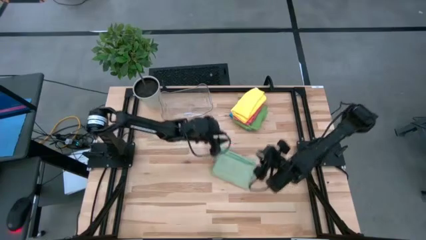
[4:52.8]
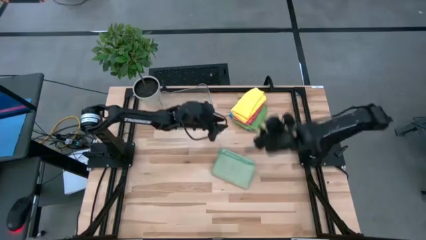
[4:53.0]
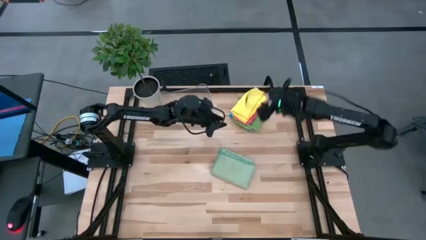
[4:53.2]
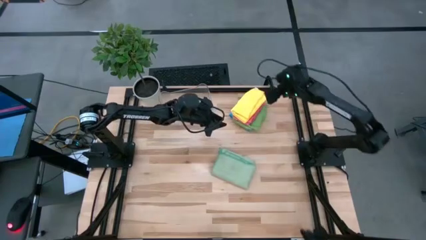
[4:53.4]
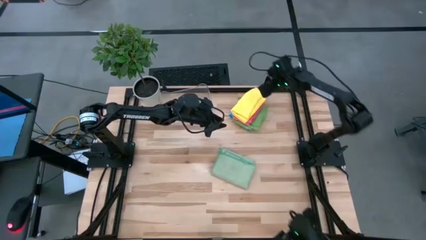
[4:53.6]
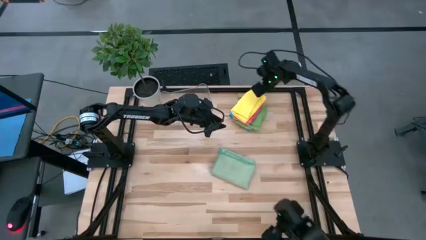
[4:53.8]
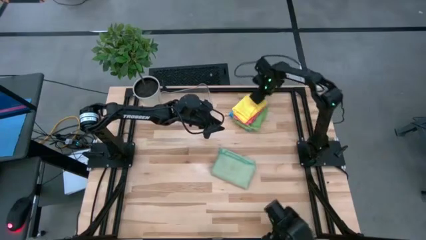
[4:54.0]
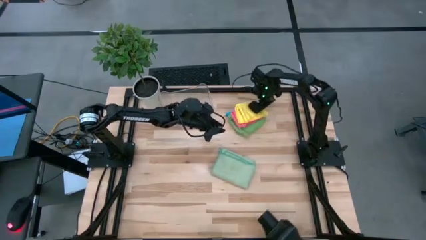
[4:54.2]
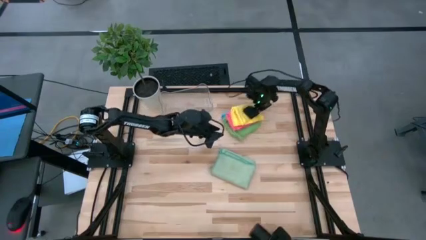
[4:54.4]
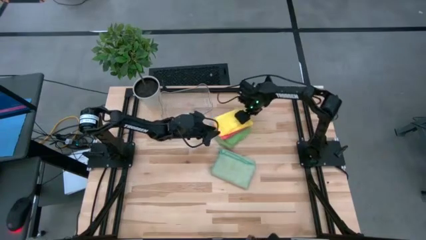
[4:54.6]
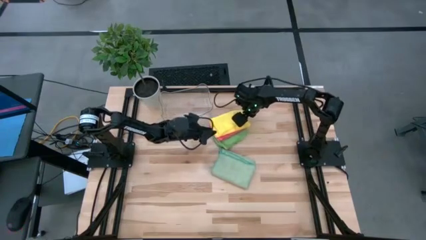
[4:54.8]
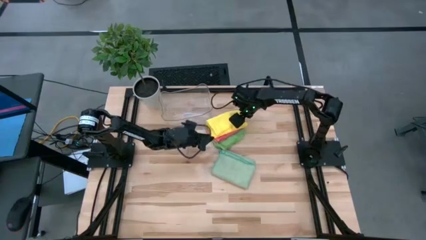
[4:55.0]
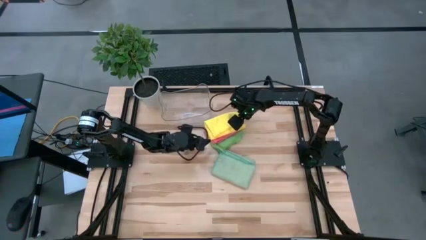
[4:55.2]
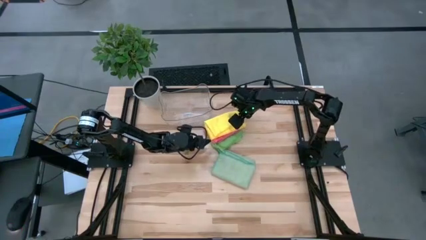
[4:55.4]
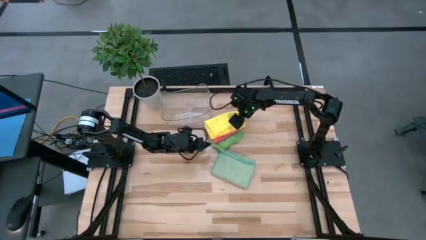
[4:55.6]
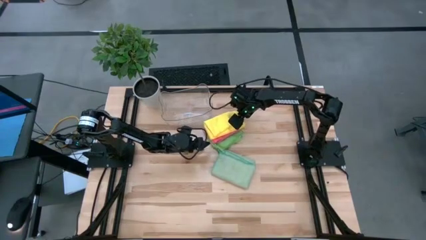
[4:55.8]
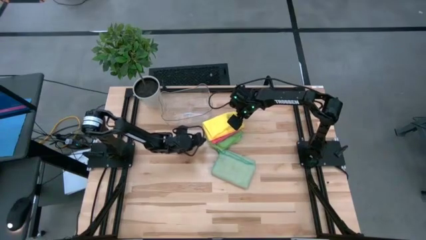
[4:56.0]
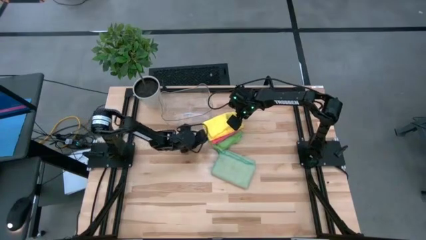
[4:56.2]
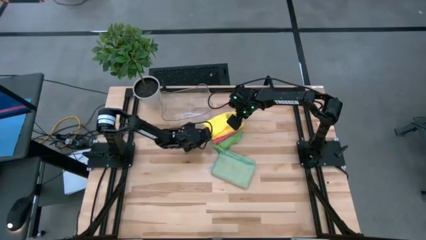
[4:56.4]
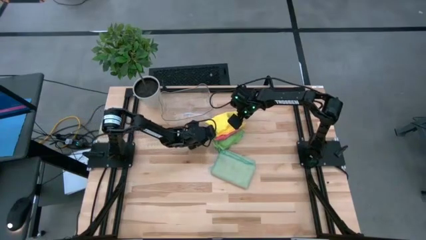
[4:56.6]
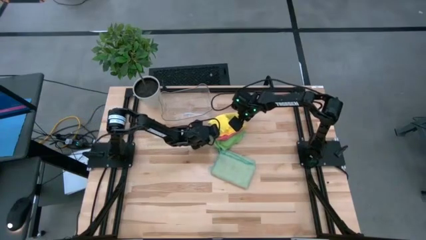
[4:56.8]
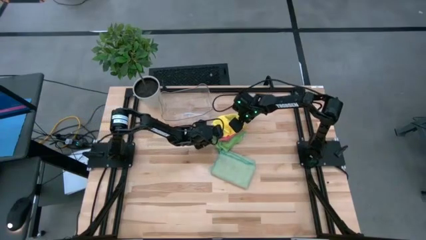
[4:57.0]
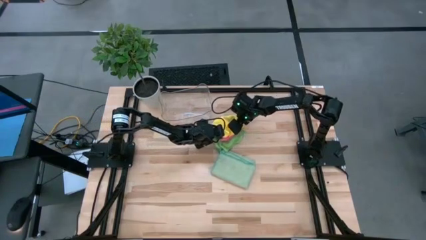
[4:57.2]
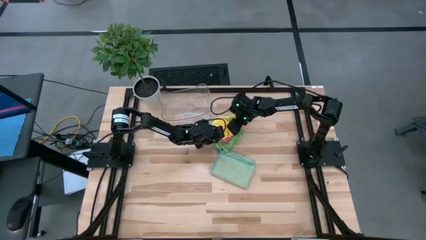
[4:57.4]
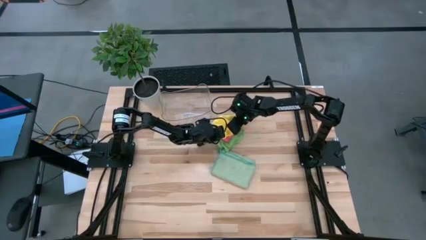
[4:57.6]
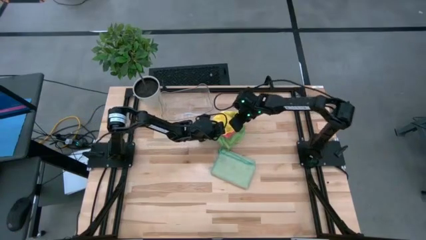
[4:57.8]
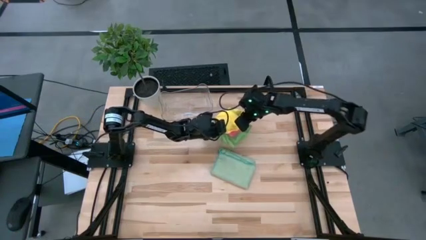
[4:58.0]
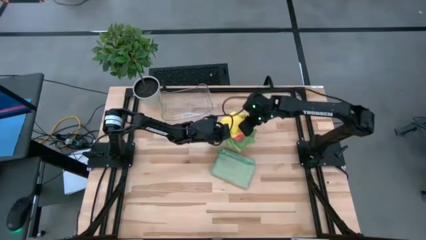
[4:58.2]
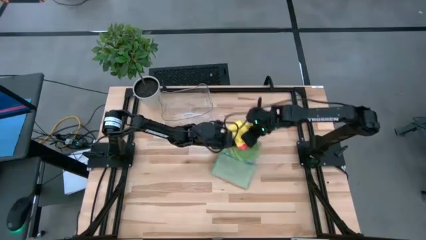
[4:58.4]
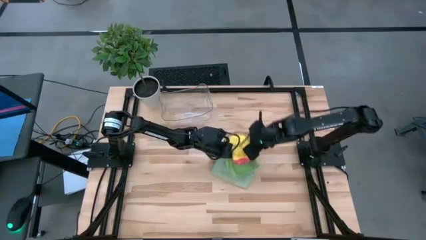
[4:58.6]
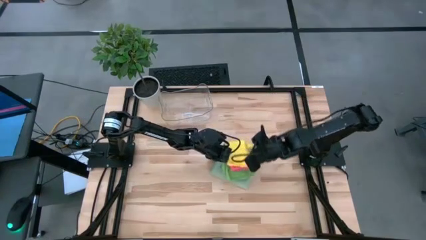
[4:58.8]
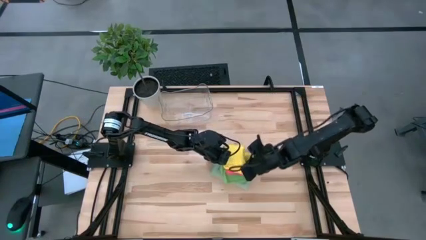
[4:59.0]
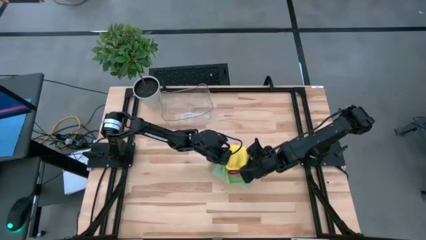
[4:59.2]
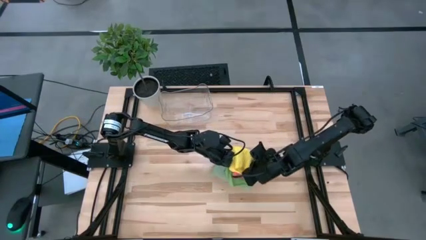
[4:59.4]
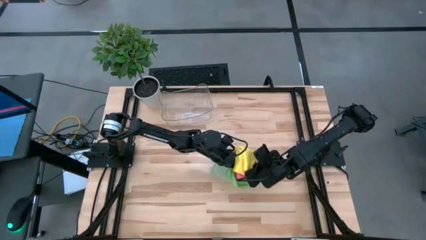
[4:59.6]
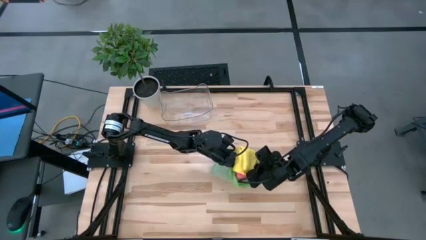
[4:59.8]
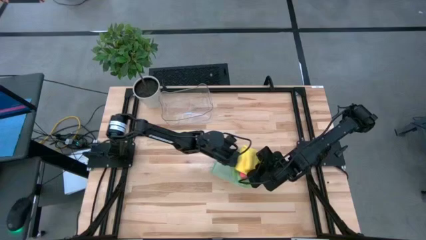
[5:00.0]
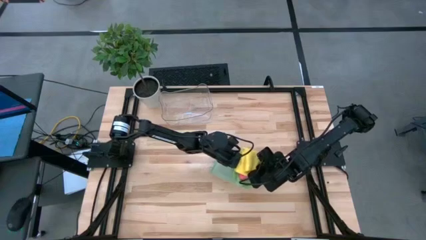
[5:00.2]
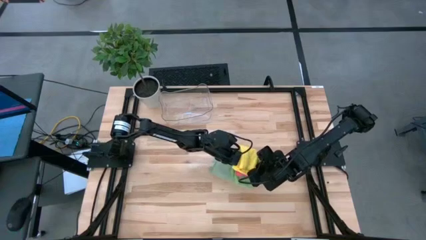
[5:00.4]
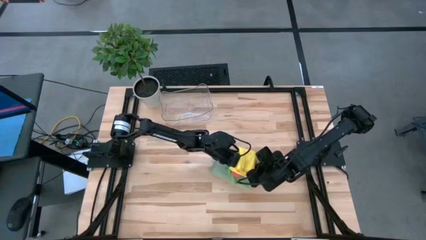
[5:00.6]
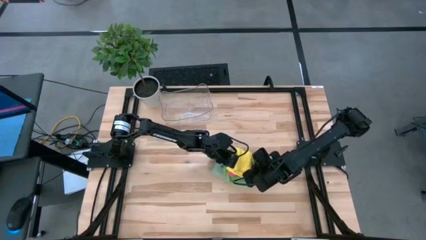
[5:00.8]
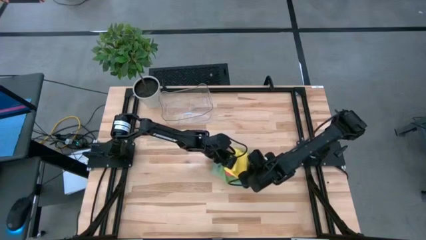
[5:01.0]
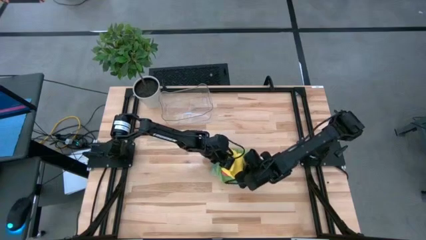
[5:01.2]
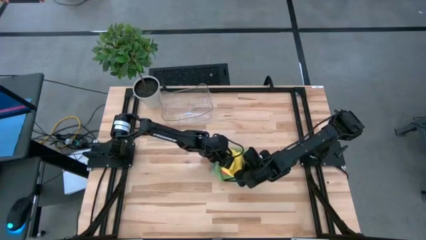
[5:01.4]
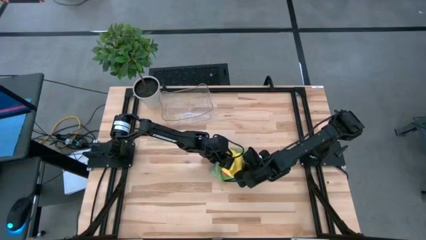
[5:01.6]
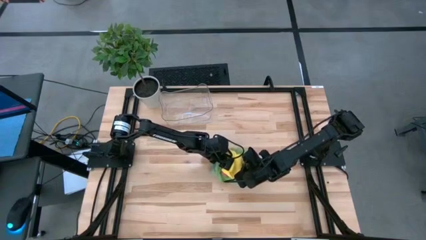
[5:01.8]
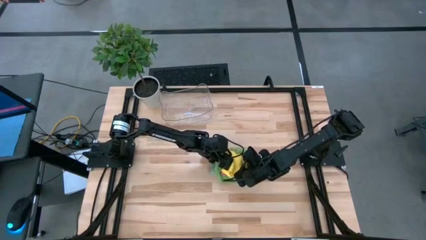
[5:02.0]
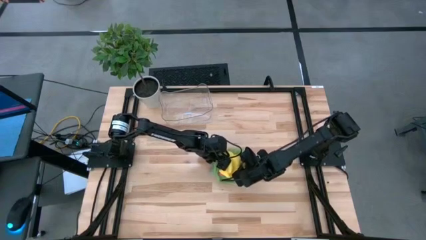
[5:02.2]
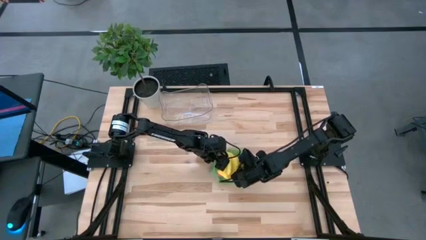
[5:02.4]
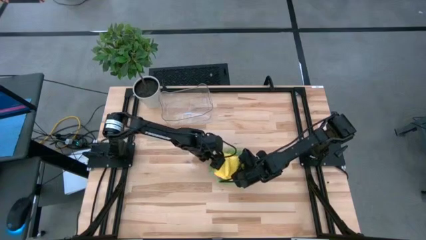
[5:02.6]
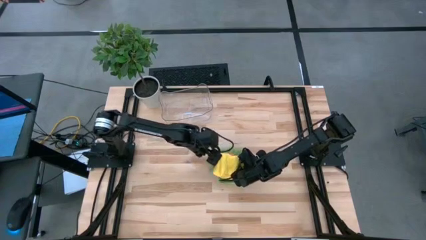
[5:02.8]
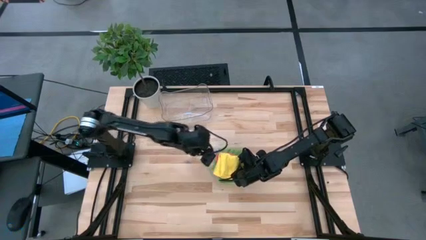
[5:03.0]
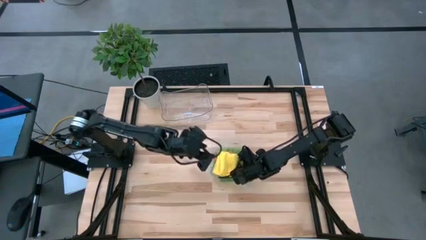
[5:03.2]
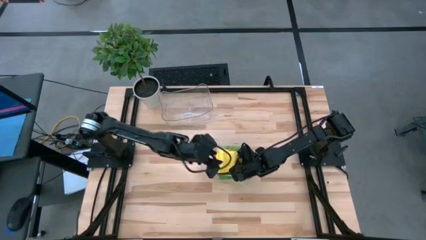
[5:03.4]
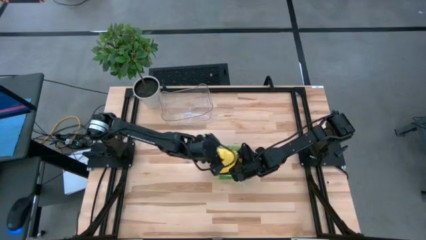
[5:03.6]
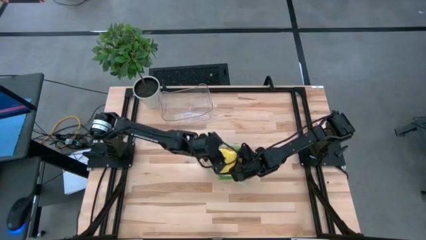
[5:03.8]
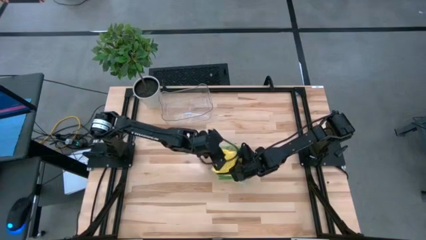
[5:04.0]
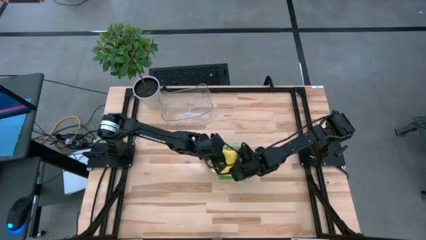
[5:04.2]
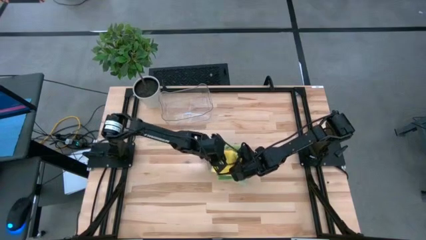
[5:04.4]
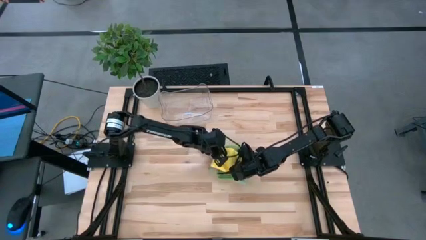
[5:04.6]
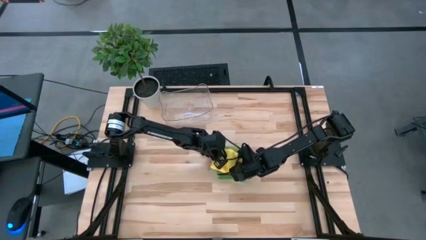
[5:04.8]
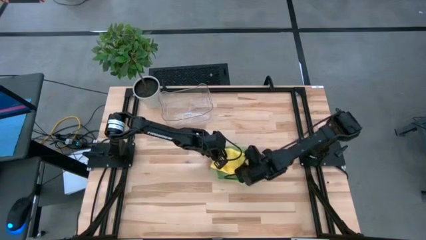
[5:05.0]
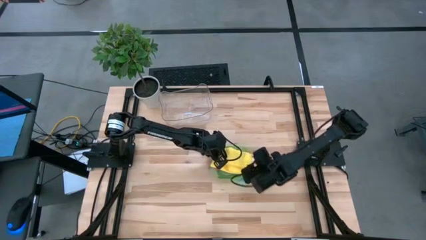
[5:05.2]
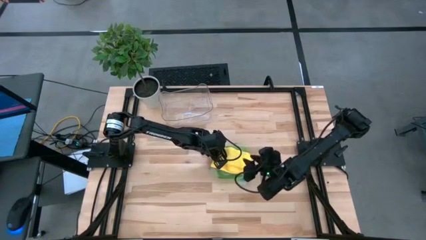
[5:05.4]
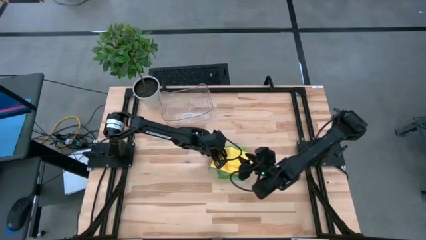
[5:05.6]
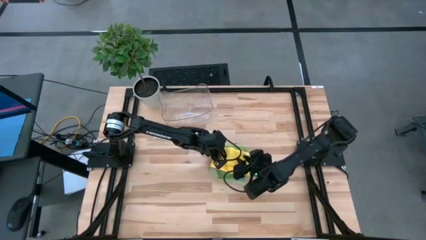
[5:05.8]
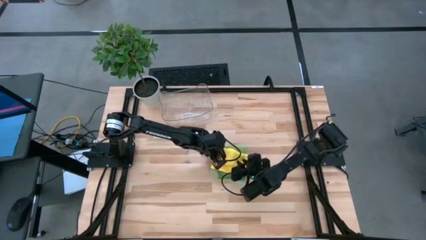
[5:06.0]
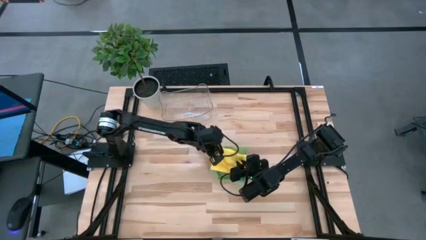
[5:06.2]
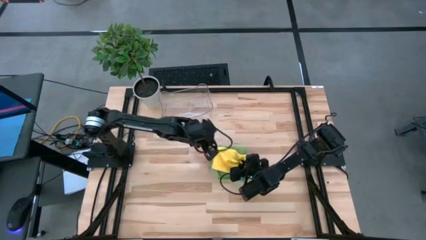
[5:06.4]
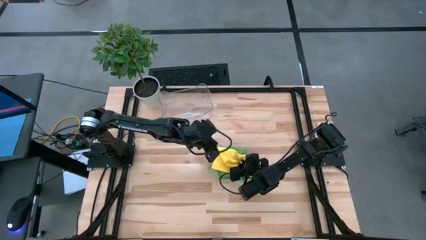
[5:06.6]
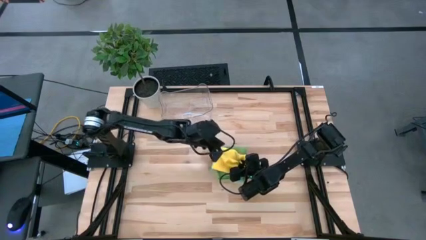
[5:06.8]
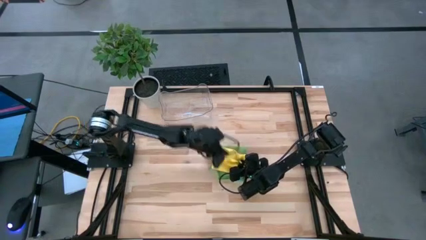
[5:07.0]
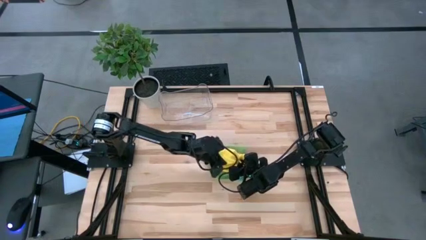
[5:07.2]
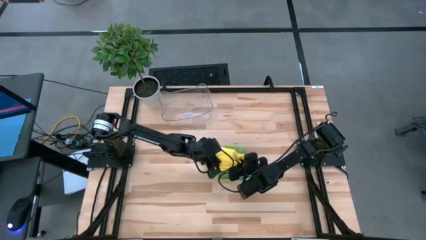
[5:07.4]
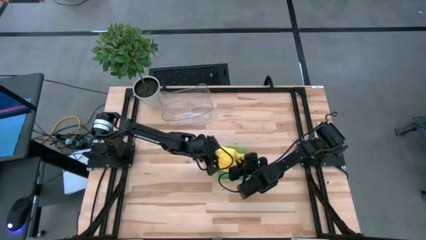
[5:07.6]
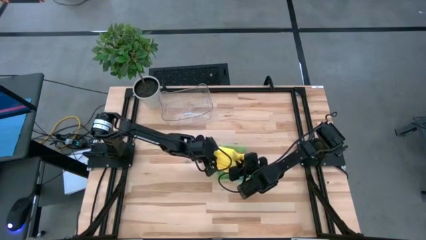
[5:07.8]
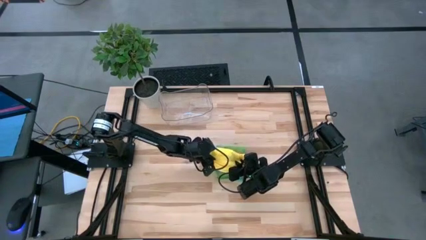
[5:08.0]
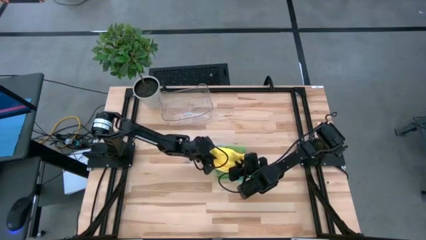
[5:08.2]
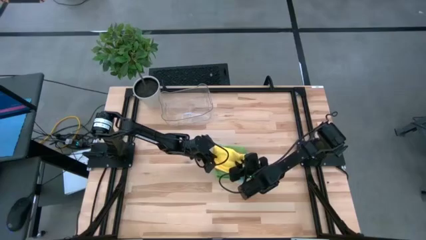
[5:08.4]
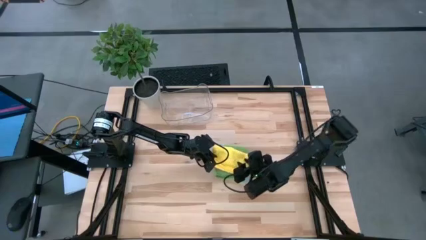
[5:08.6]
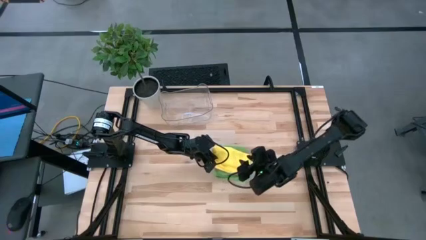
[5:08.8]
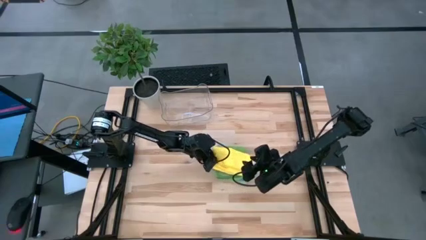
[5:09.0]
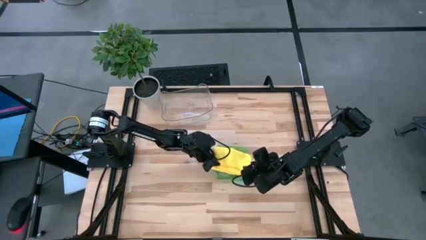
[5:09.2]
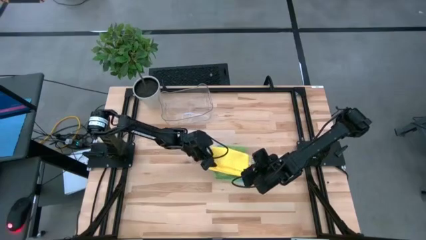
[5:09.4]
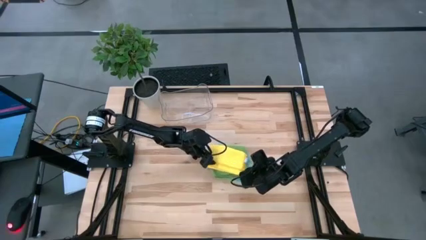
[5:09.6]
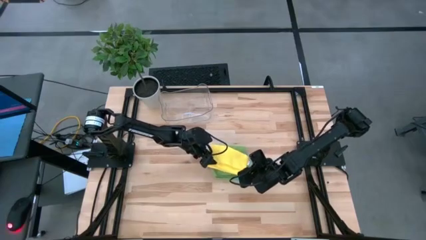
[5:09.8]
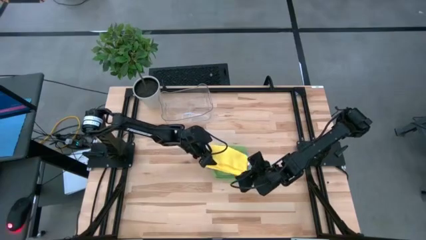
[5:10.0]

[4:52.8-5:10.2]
Task: Fold microfiber towels
Stack the stacked microfiber cloths on the light green microfiber cloth
